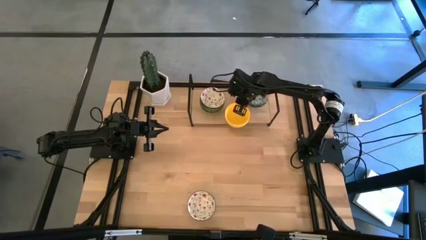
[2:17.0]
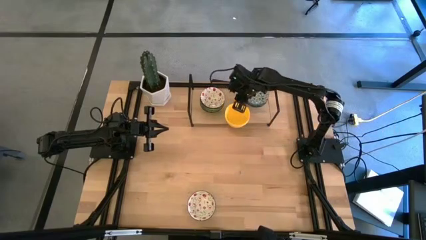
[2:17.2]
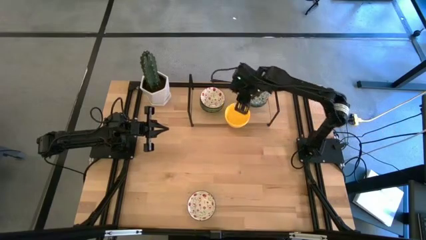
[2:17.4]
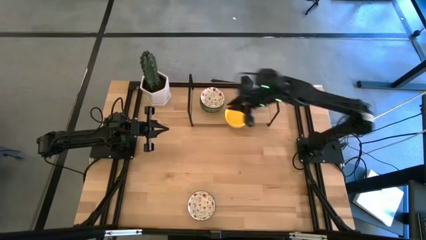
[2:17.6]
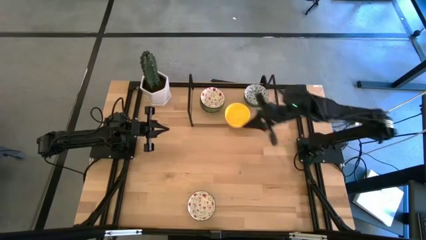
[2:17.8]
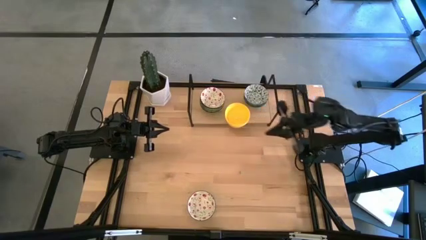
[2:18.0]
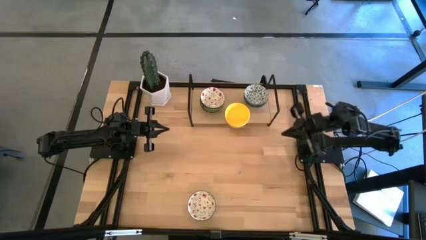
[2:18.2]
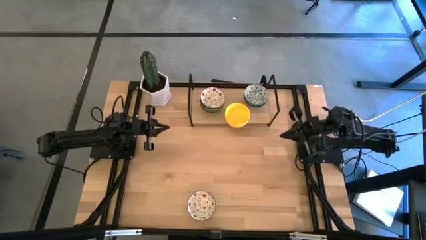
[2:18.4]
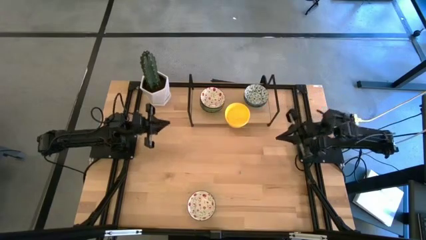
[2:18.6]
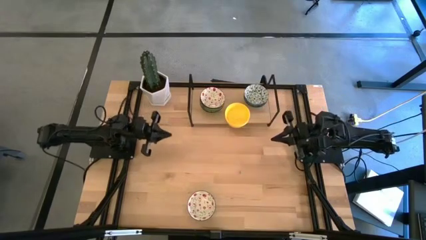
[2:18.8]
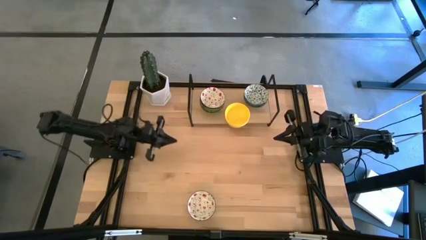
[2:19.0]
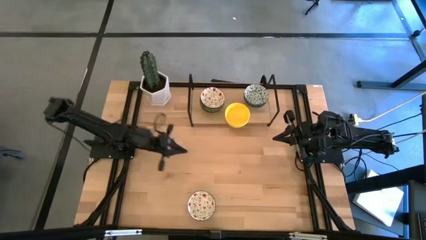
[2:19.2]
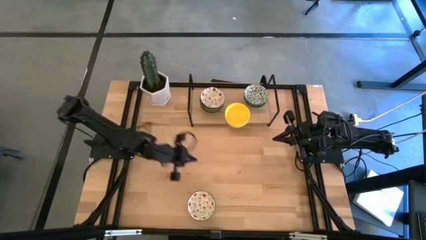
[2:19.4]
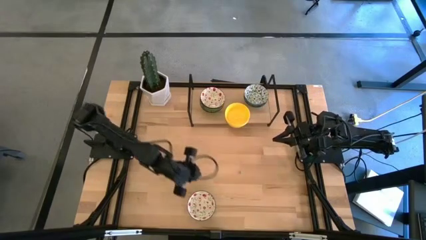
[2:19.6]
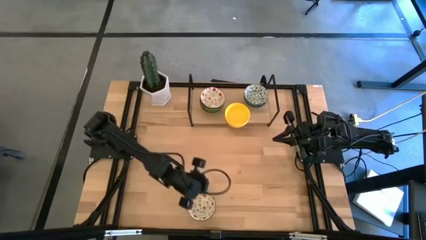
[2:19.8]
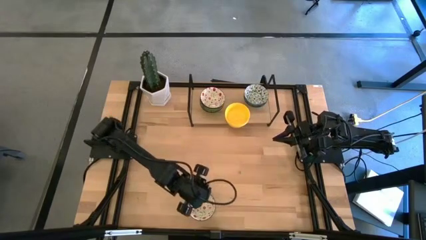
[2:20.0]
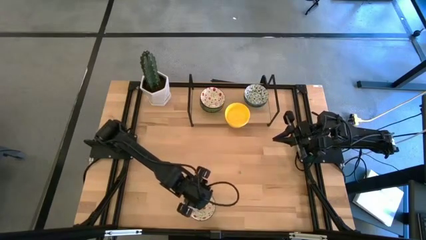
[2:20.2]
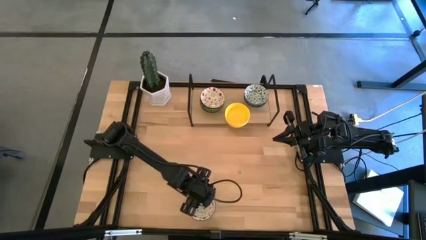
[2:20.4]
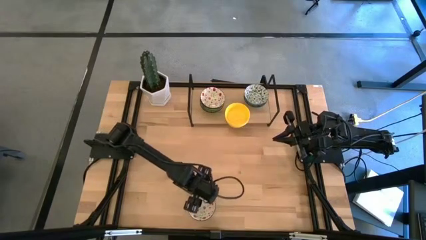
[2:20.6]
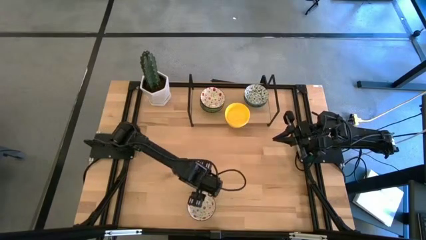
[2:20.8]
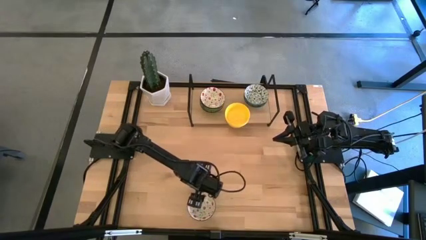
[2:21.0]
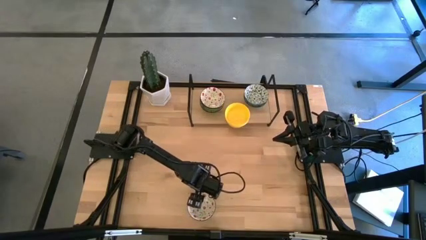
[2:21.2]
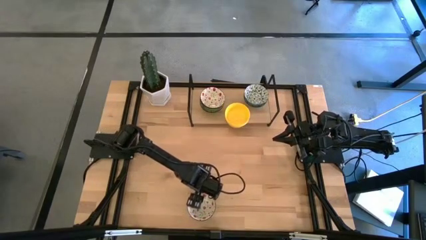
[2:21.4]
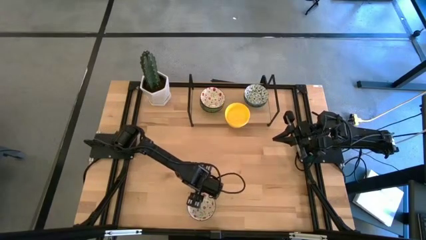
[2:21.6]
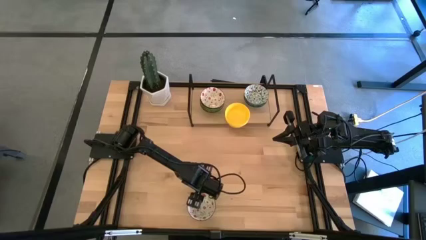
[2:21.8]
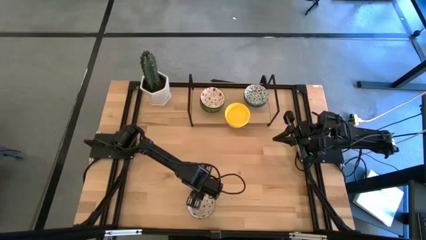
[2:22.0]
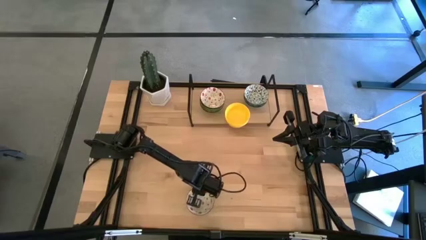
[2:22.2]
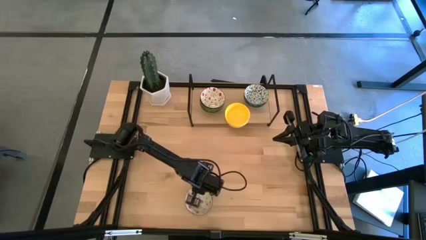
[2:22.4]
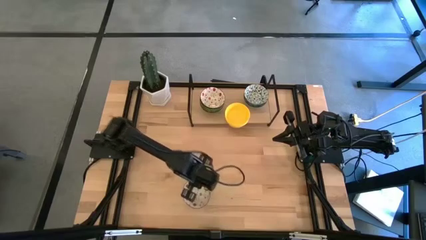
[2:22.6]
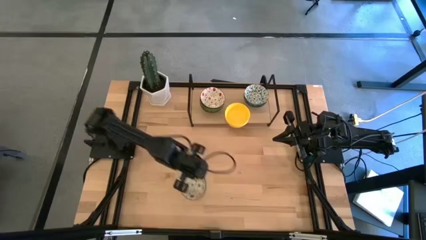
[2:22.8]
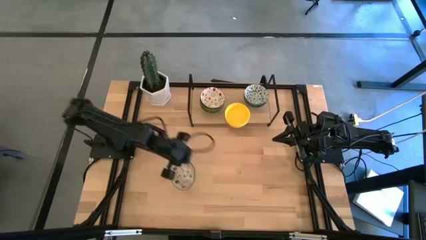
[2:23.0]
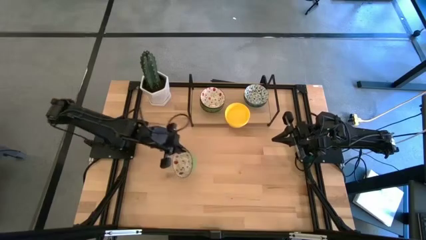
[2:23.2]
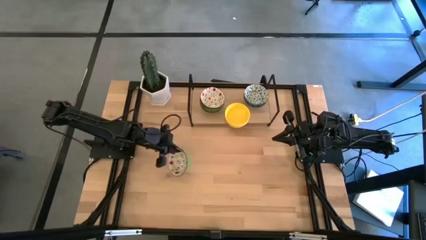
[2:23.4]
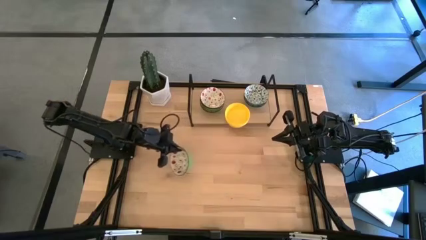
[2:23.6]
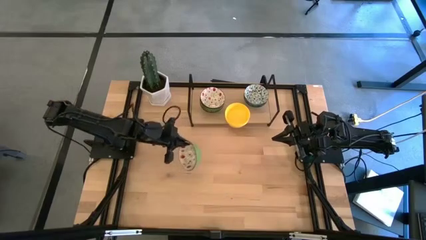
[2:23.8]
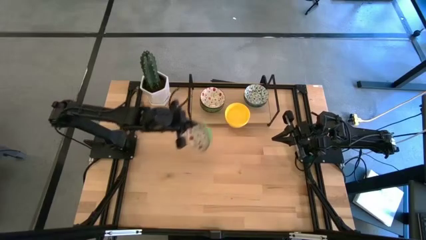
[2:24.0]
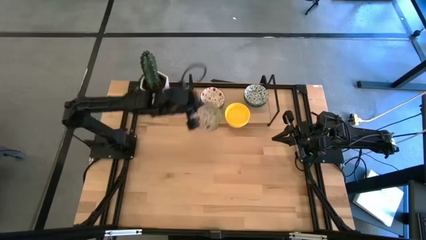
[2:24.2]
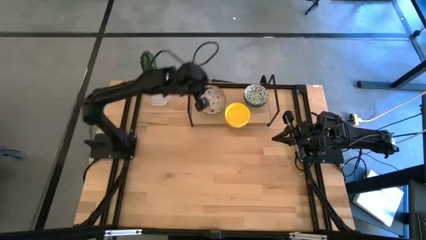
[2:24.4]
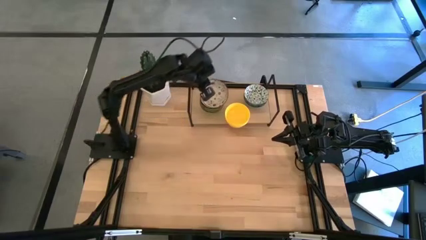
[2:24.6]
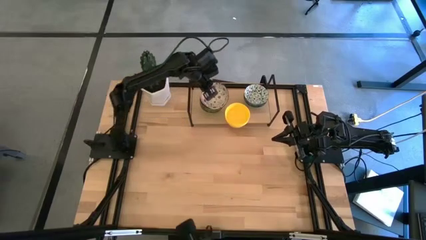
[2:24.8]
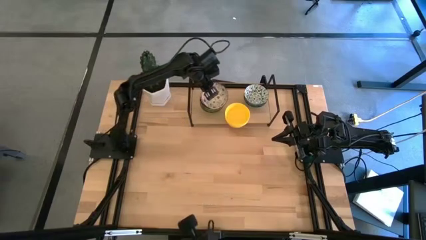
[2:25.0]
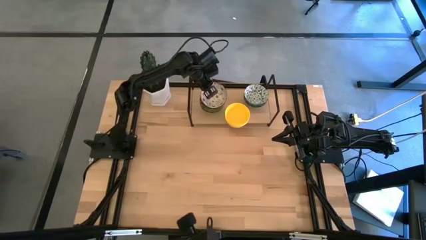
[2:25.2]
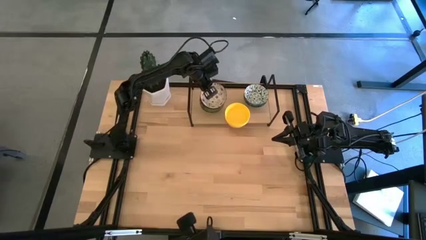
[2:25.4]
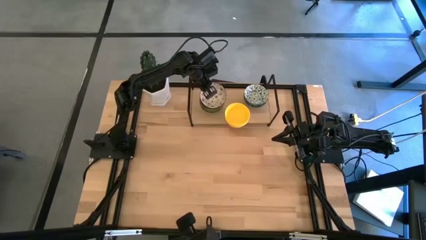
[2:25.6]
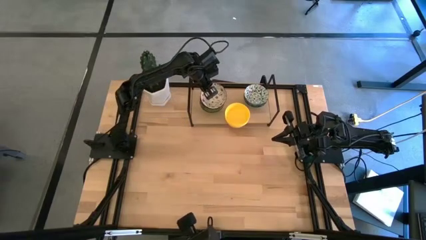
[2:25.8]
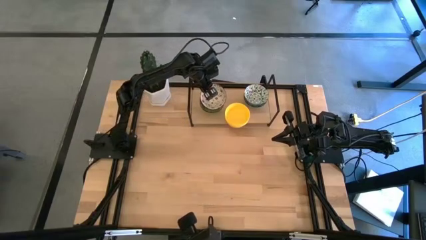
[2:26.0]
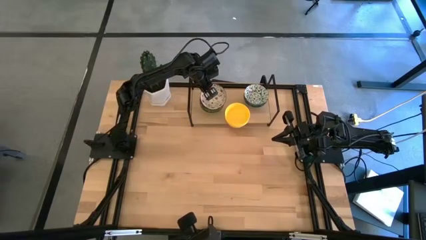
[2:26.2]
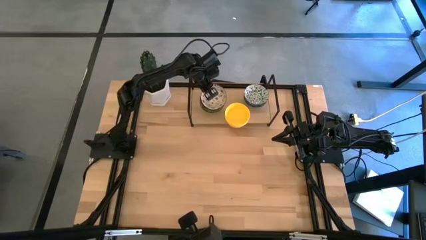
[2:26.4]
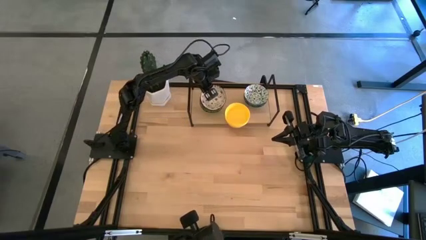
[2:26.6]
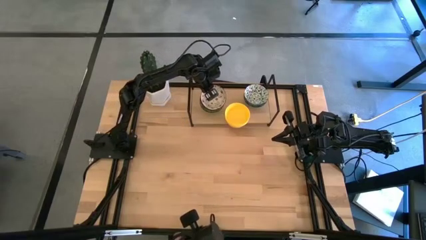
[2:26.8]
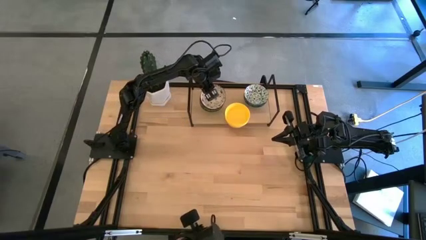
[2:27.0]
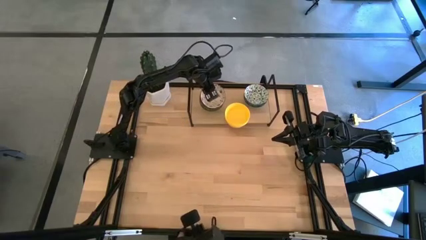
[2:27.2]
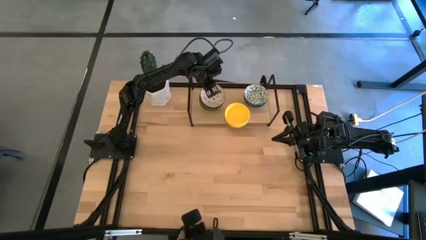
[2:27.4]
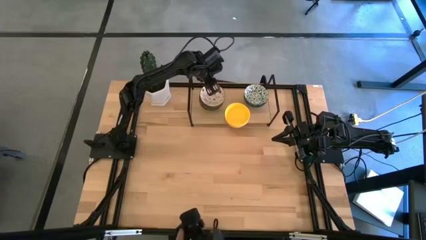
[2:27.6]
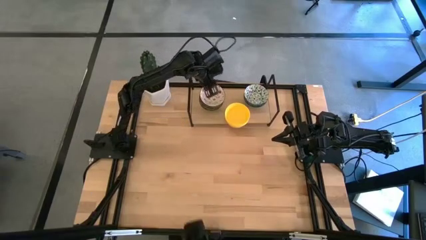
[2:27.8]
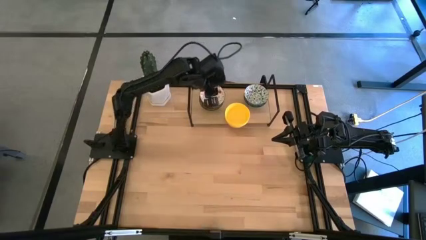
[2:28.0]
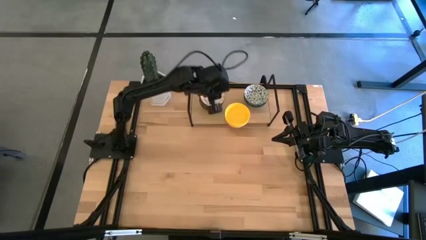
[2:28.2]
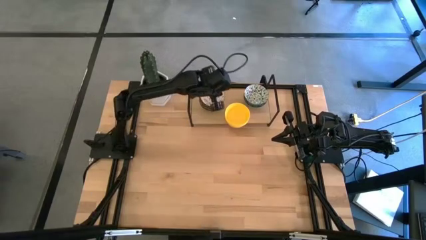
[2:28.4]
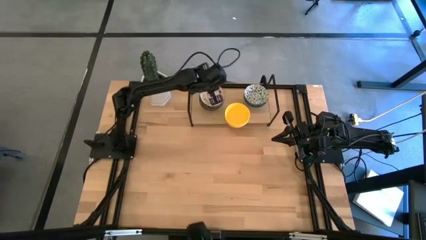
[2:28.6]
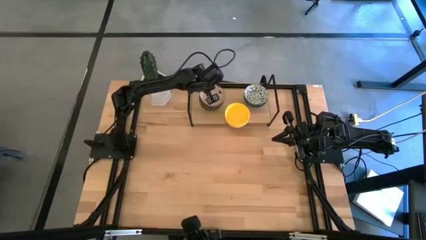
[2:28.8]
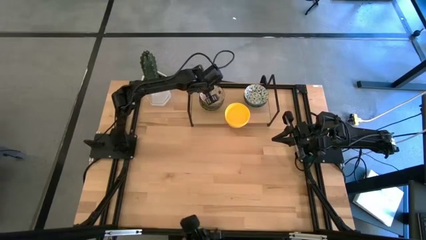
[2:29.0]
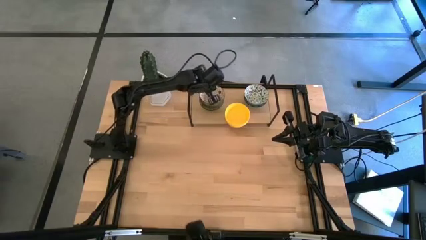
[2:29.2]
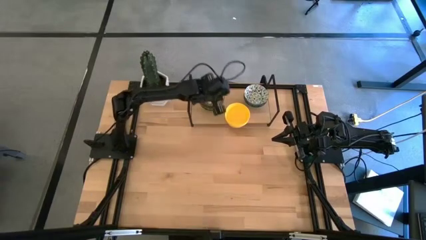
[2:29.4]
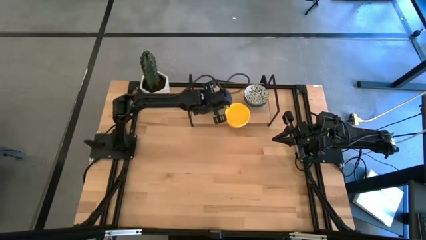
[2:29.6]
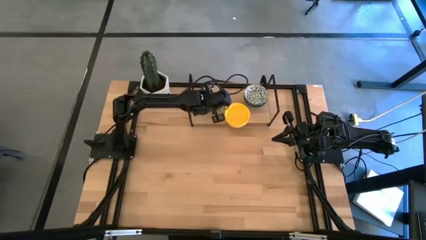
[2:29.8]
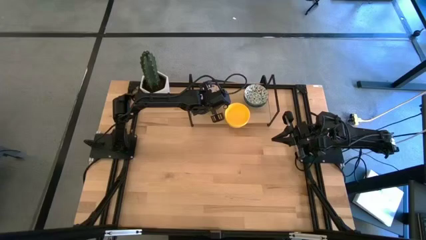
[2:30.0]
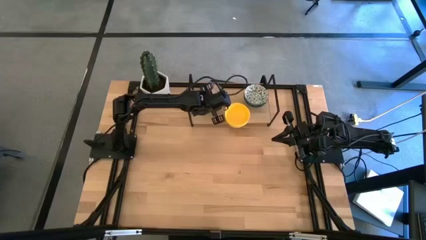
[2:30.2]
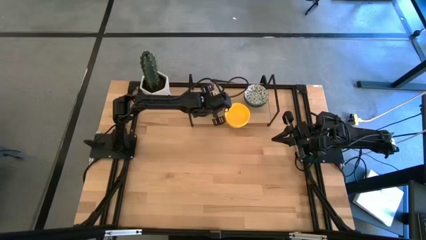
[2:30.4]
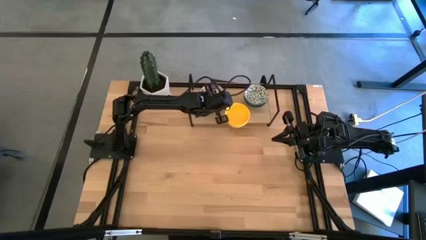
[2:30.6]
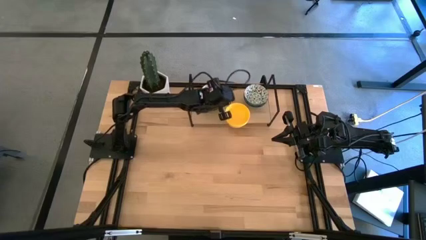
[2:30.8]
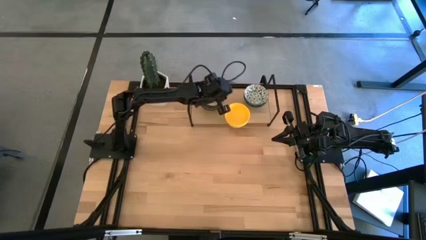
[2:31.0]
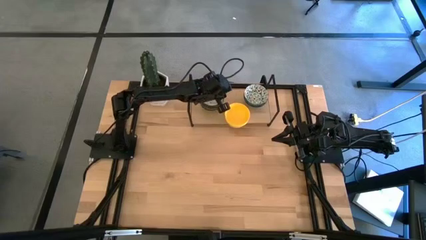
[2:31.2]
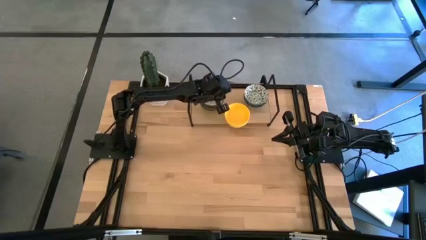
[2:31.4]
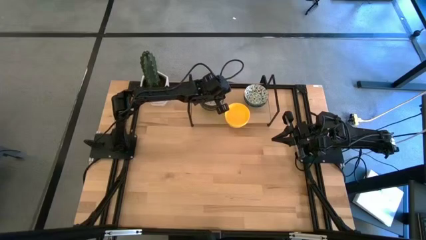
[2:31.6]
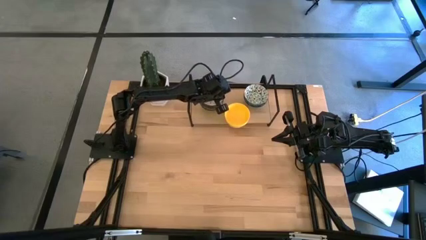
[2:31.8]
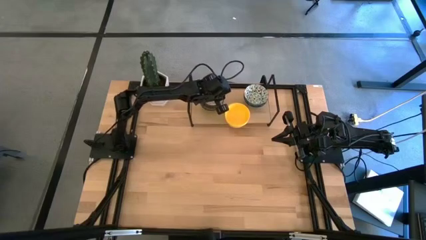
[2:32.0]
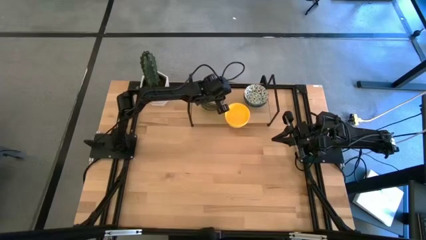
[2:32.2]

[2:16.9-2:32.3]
Task: Pick & Place Mini bowls
Stack the white bowl on top of the white bowl on the shelf
